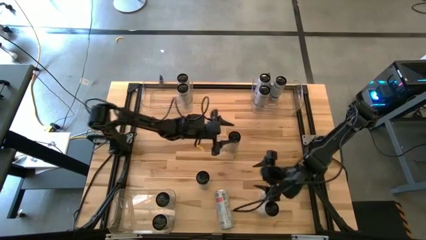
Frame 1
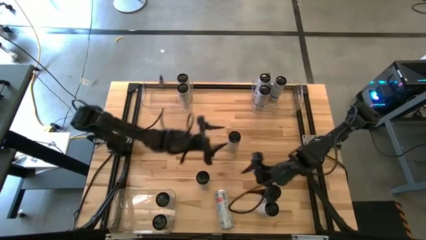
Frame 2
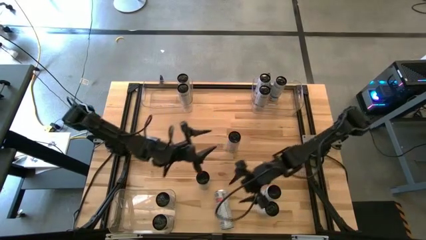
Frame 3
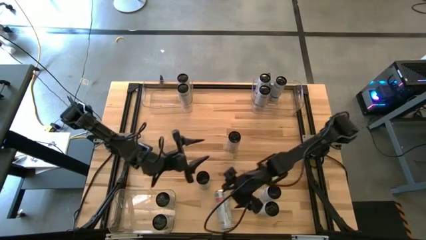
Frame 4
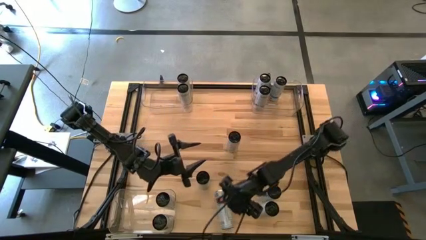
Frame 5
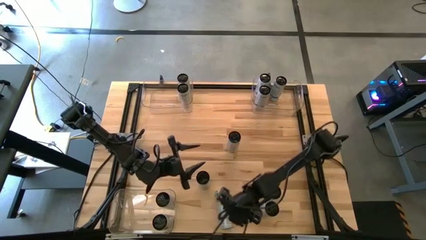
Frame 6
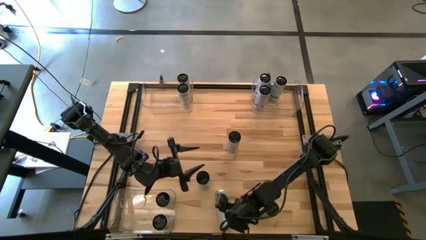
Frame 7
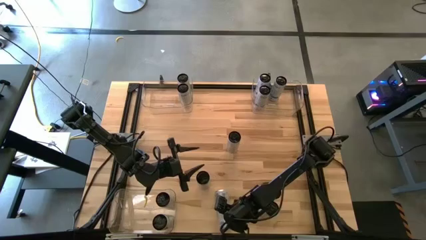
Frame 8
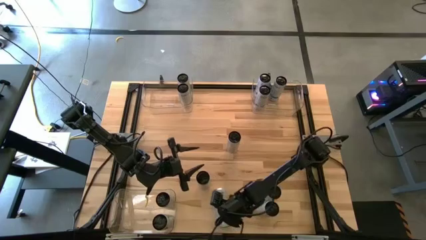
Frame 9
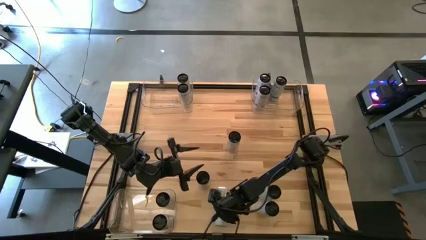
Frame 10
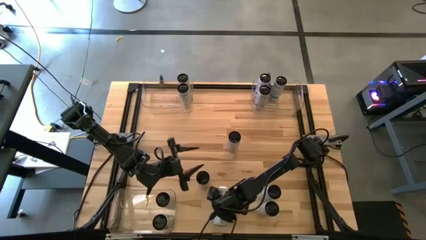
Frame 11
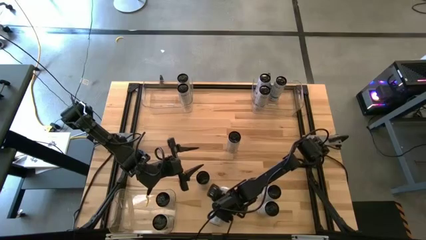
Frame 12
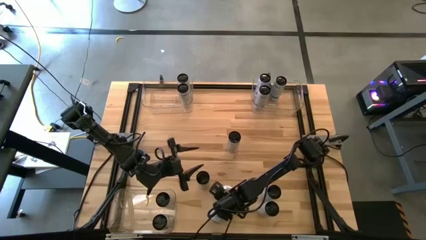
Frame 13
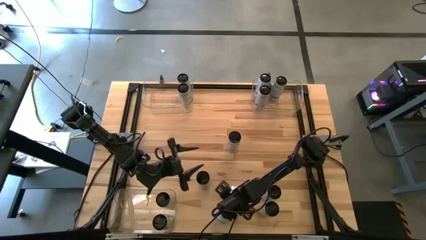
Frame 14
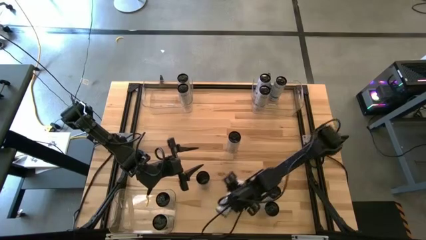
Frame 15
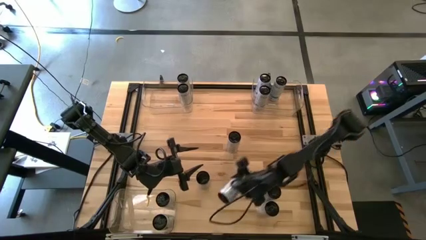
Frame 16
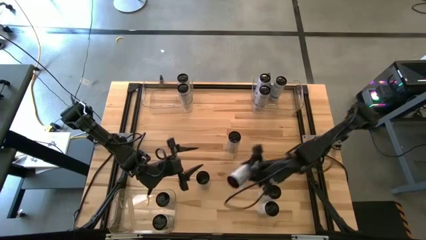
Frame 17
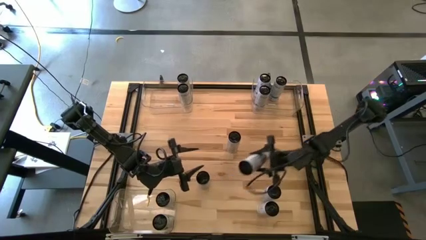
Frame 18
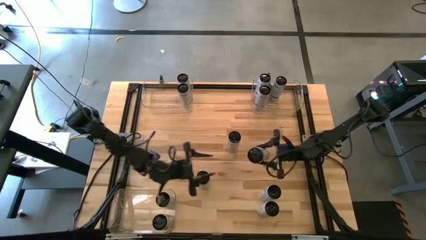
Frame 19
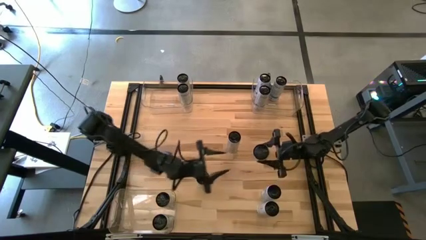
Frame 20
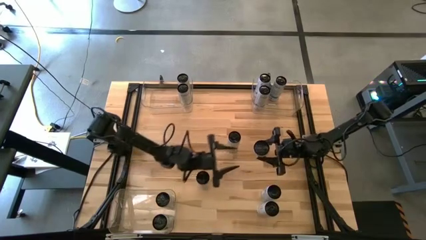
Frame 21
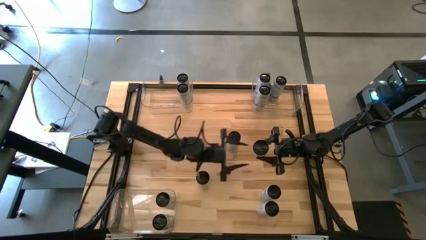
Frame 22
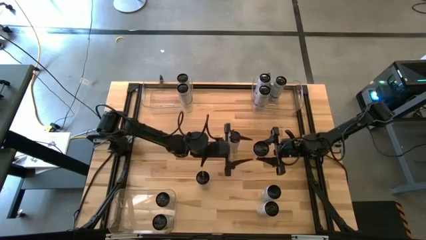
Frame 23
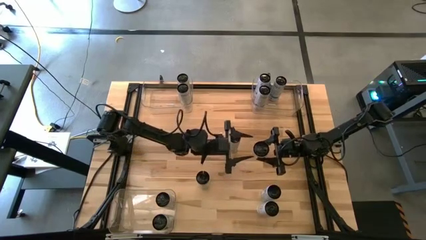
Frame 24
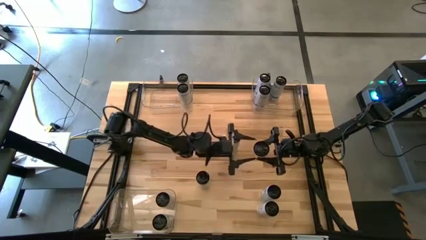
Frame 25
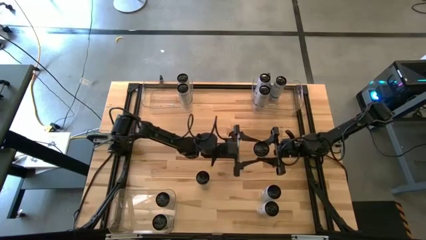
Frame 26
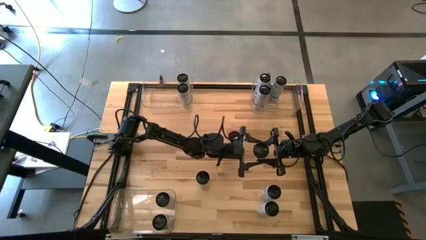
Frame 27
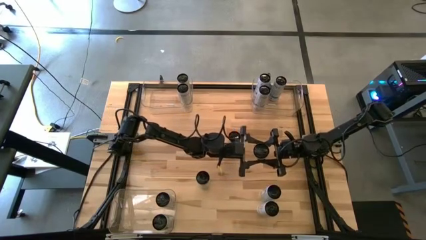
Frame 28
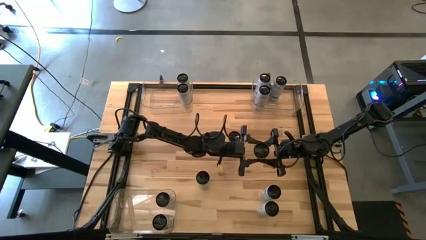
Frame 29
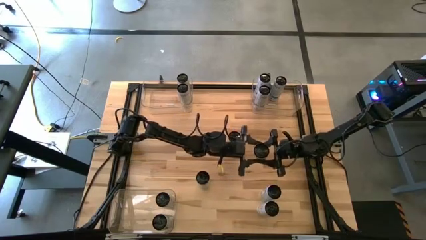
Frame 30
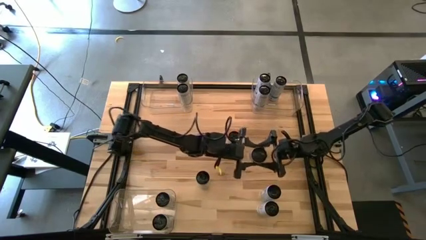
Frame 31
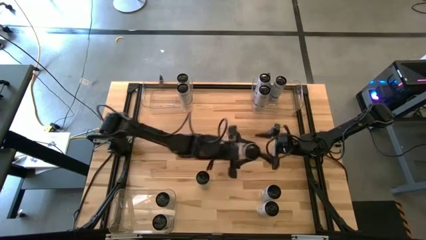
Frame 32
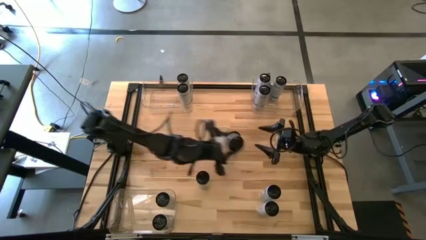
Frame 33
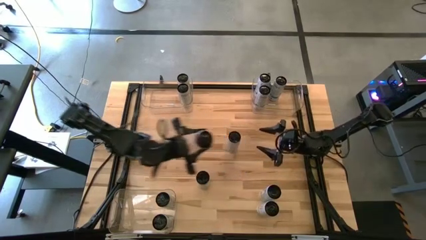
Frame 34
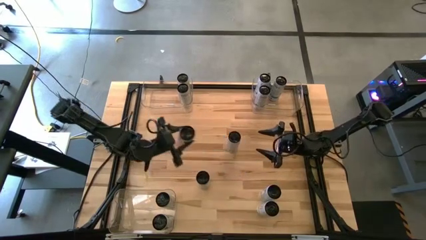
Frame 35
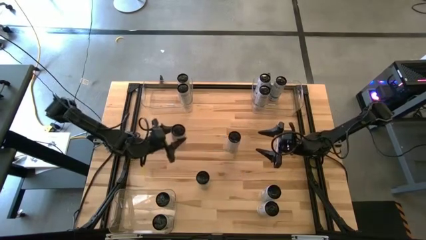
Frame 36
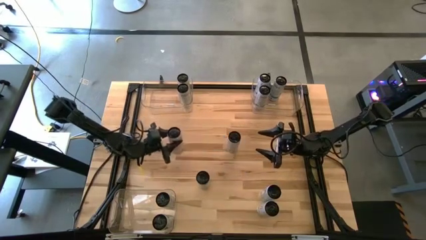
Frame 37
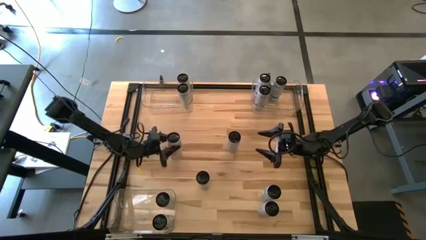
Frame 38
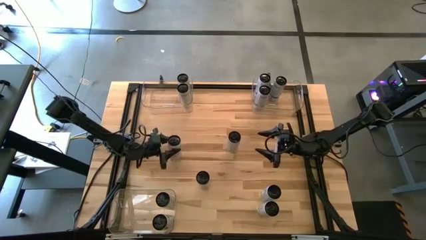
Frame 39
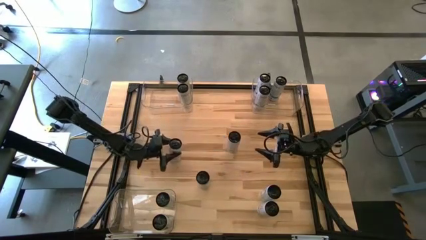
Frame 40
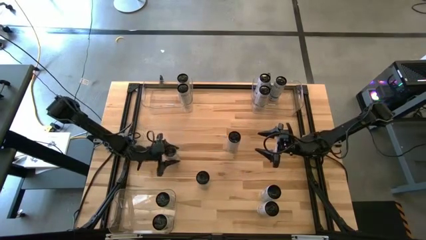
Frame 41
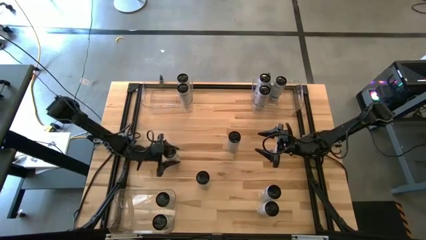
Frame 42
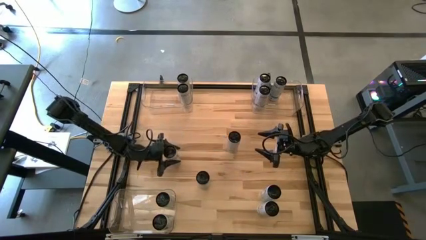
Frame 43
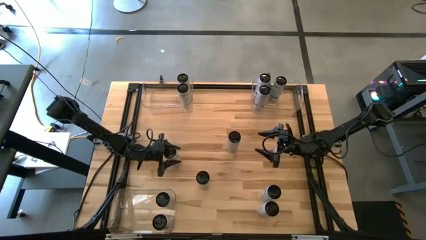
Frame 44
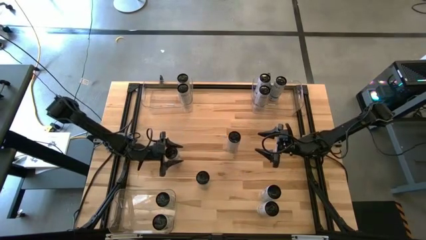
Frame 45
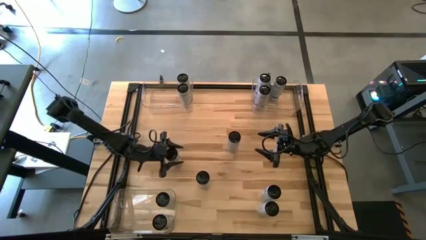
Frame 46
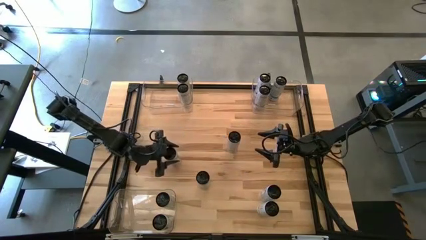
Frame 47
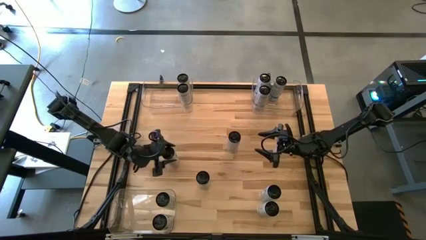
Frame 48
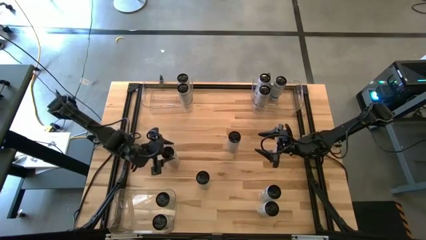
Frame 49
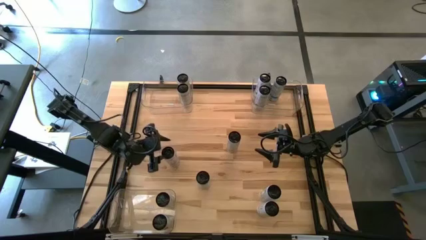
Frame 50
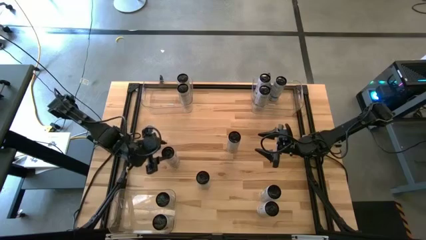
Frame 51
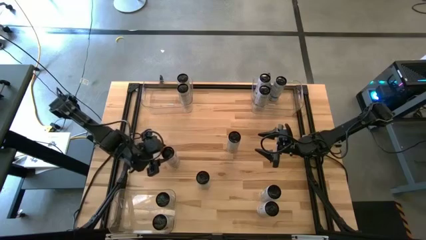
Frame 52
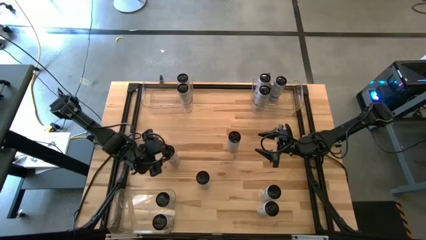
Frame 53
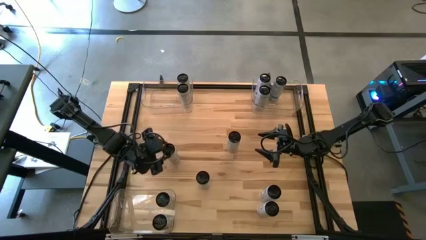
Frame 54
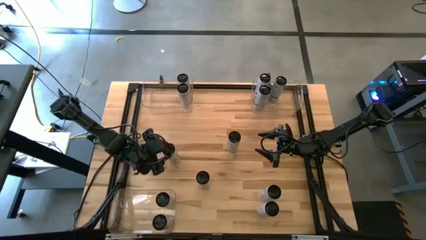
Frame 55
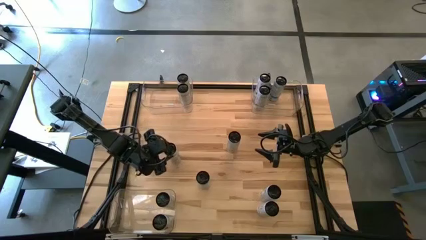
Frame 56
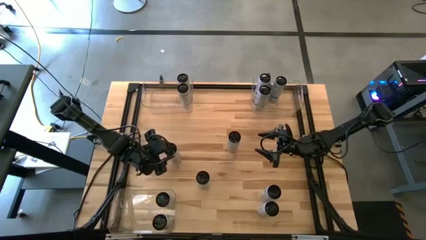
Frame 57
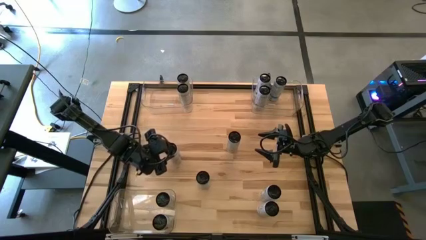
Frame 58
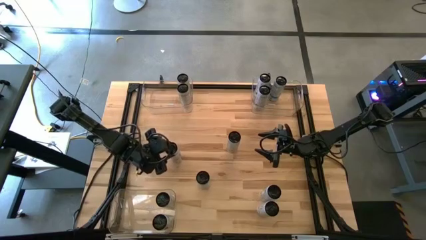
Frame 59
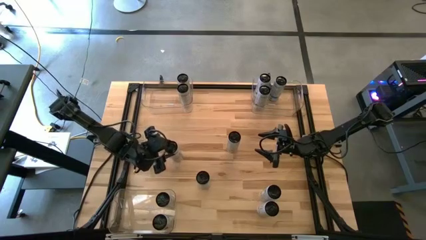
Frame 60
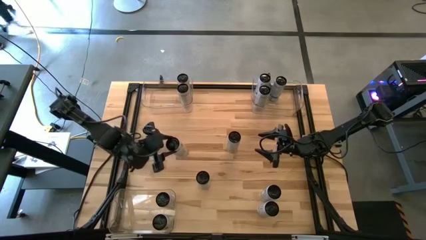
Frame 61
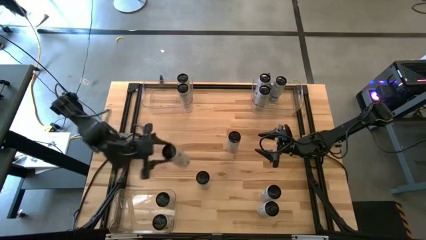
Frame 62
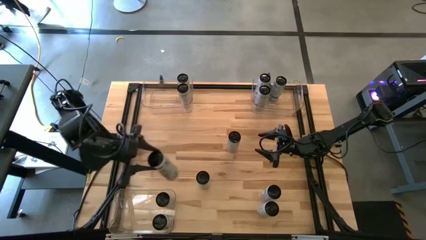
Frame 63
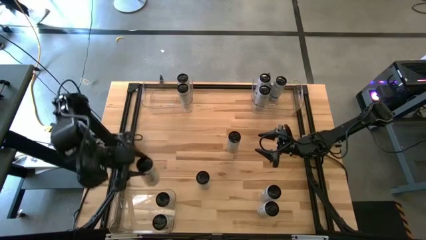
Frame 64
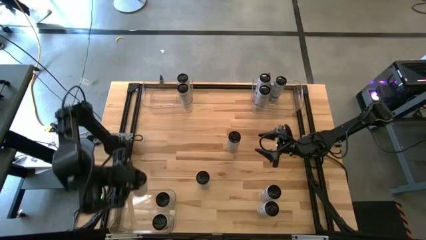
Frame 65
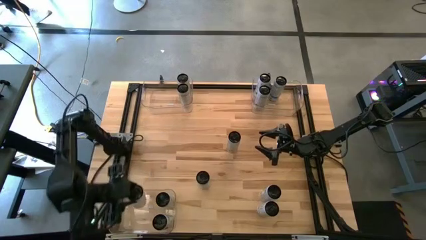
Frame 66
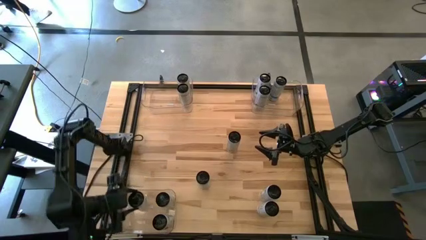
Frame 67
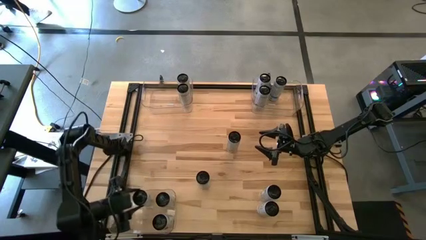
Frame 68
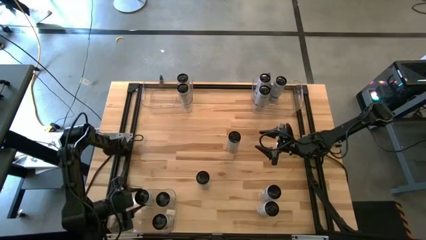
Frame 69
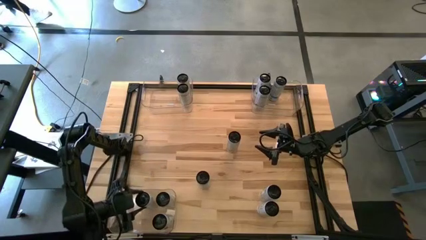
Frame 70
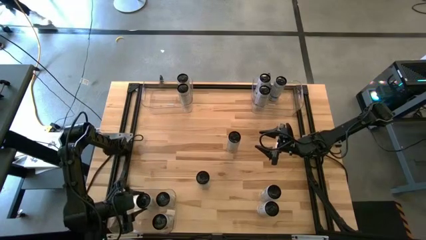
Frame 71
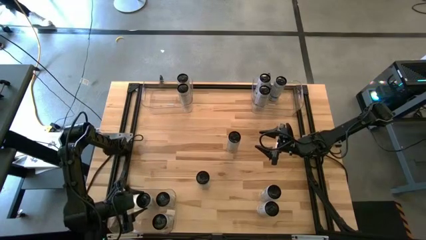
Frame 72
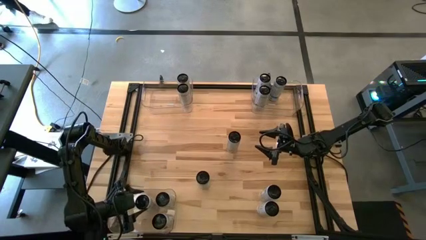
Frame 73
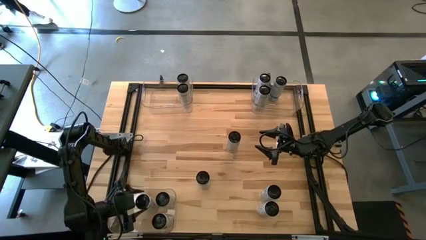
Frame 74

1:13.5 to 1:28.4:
Task: Sort soda cans
Put the white-pink soda can into the bottom left transparent bin

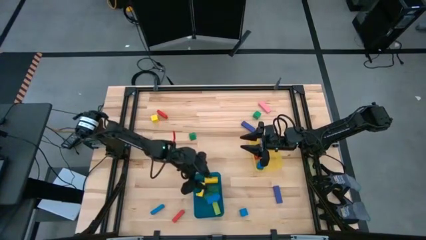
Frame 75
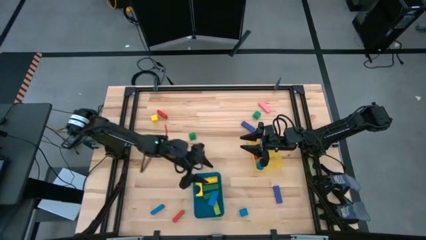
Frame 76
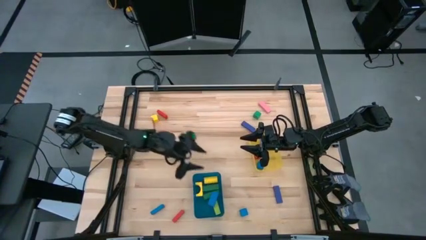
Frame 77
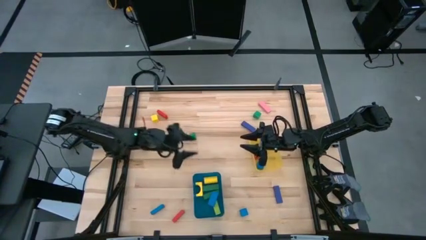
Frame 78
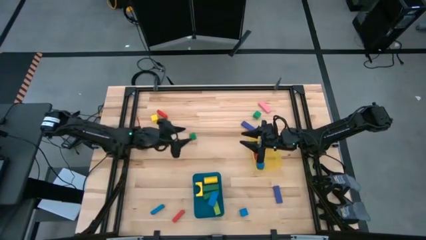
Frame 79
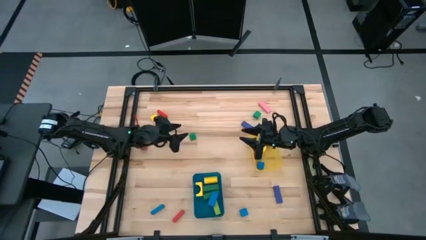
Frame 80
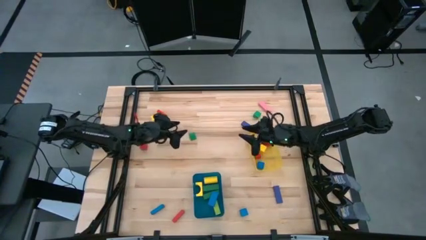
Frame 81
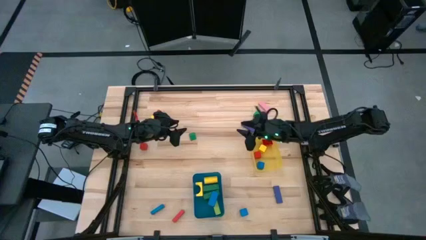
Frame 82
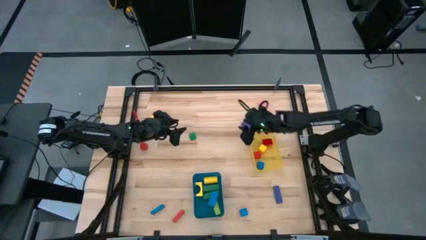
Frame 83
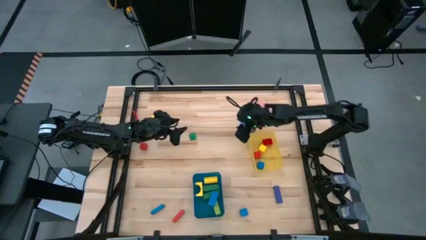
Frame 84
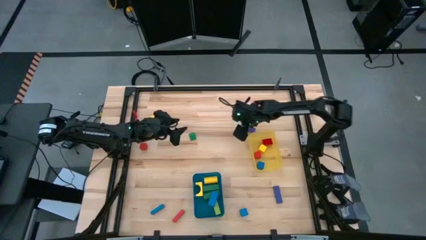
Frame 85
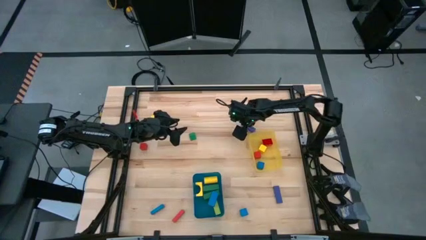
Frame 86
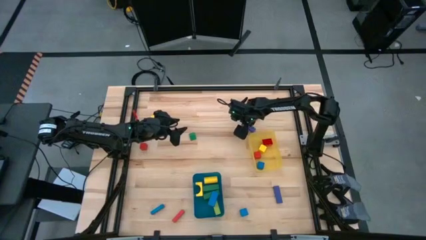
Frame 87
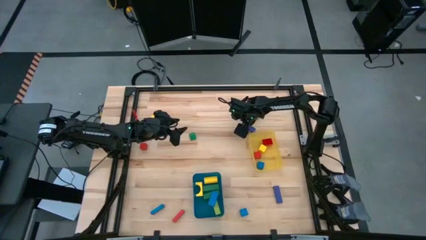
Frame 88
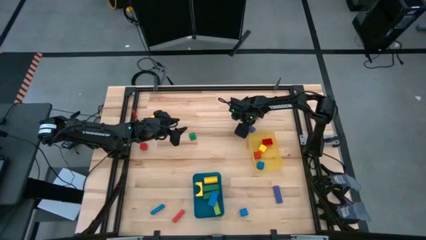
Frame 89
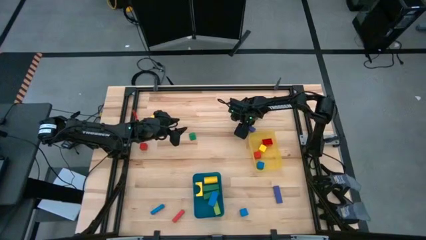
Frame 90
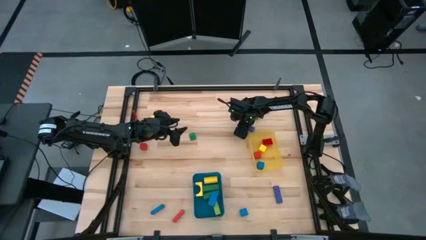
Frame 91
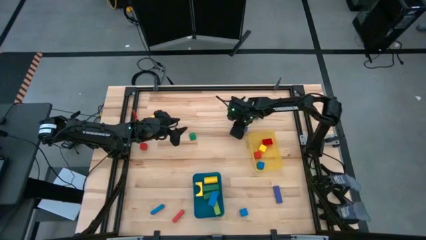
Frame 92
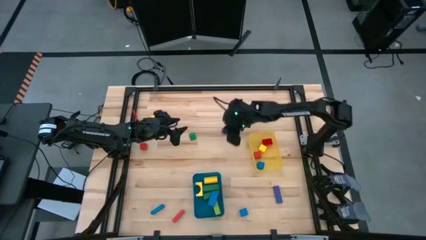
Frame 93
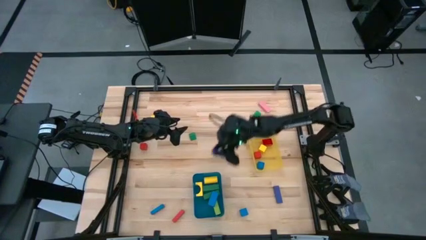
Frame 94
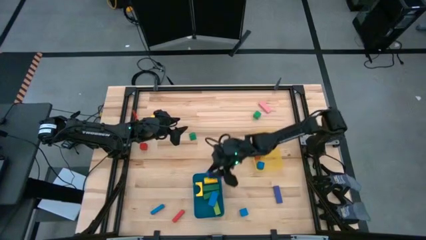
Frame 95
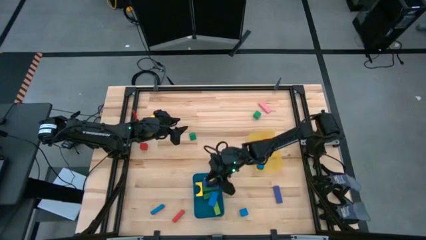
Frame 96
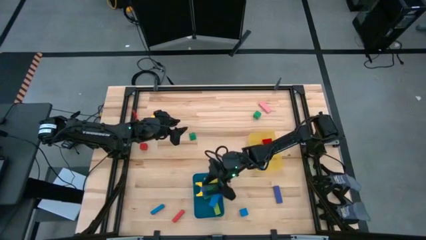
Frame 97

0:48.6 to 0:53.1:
Task: Sort blocks by size
Put the large blue block into the blue bin
